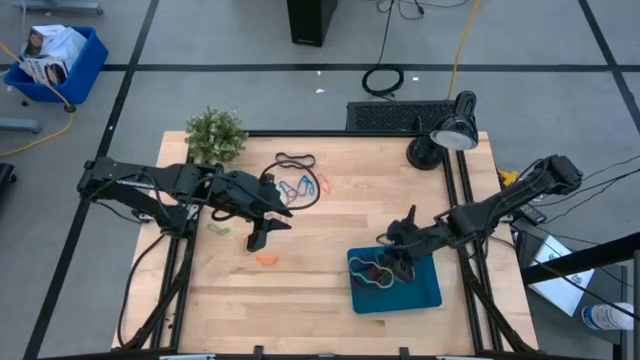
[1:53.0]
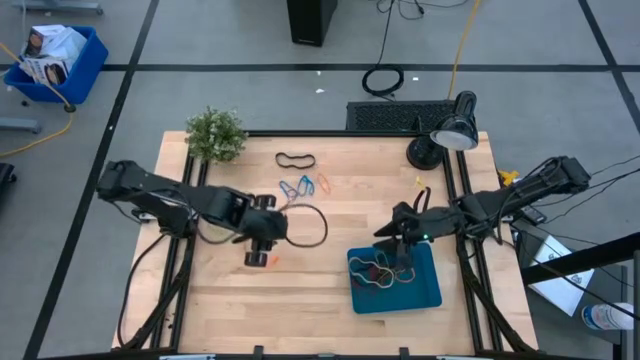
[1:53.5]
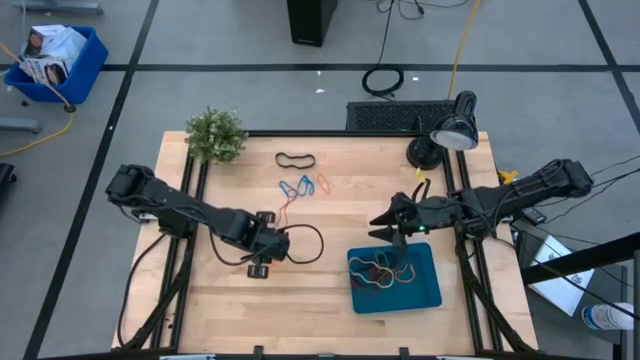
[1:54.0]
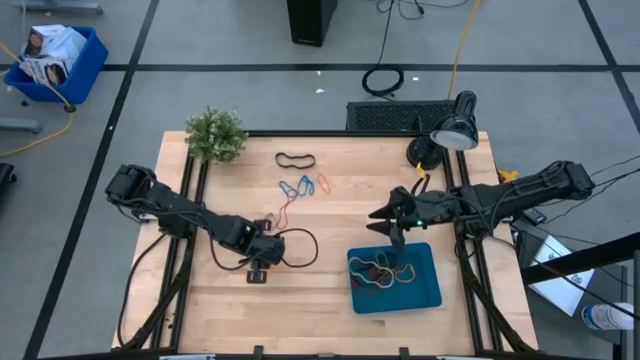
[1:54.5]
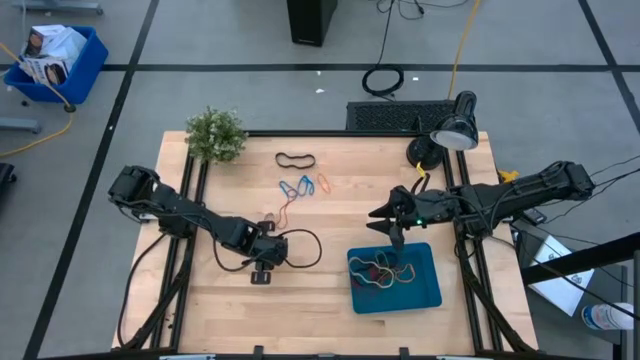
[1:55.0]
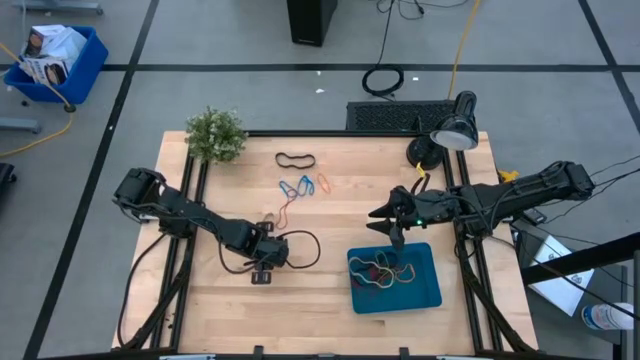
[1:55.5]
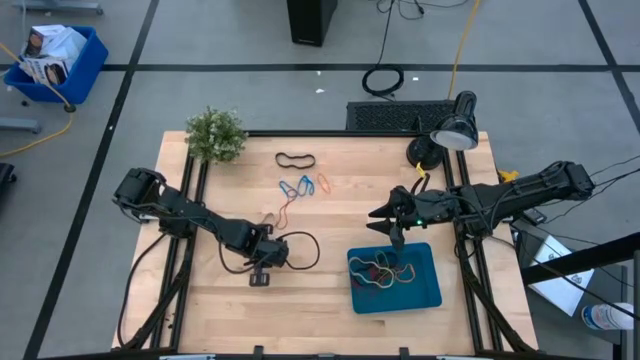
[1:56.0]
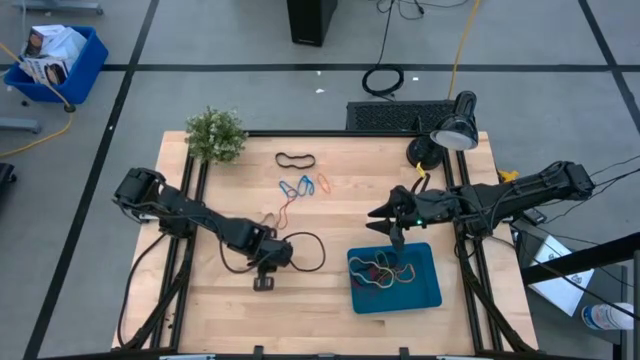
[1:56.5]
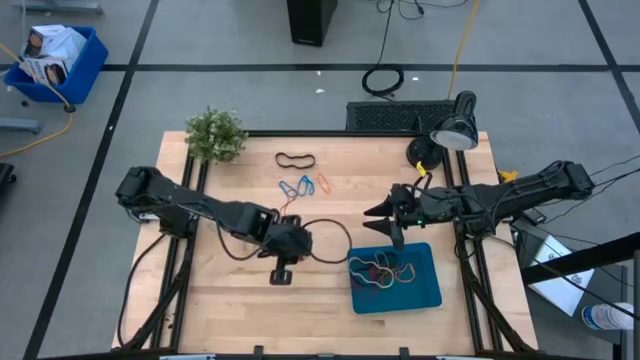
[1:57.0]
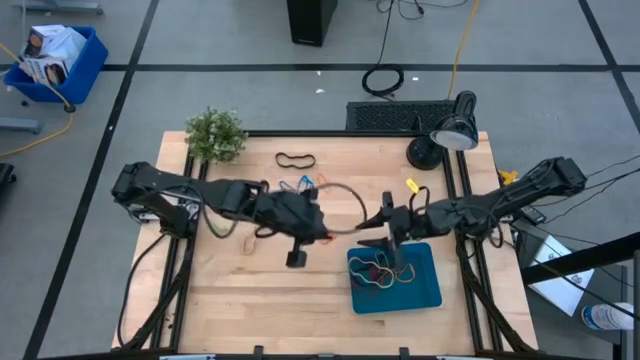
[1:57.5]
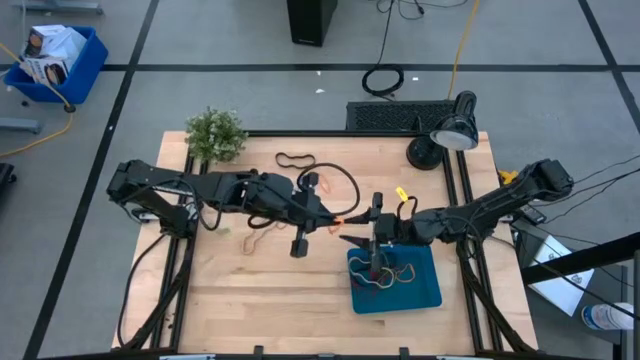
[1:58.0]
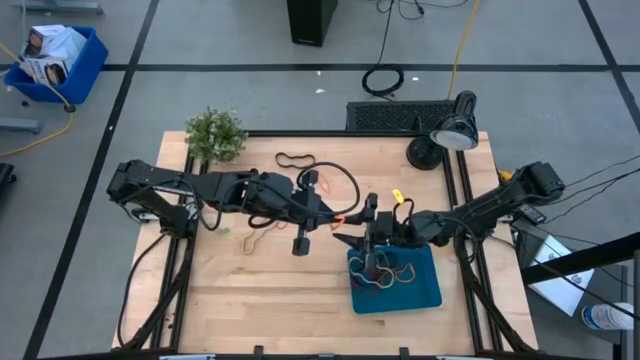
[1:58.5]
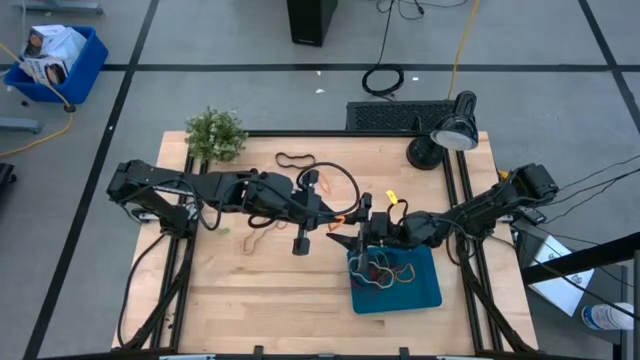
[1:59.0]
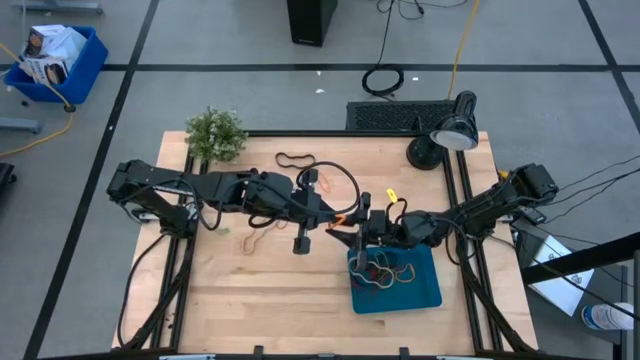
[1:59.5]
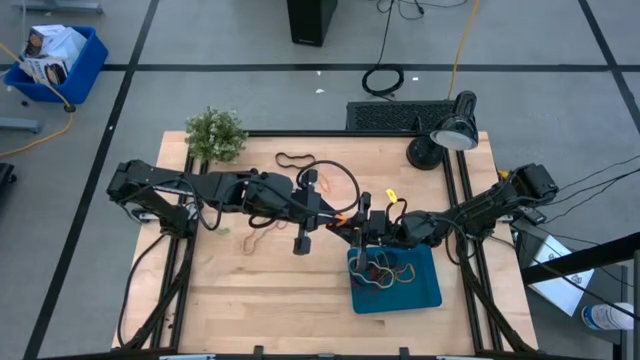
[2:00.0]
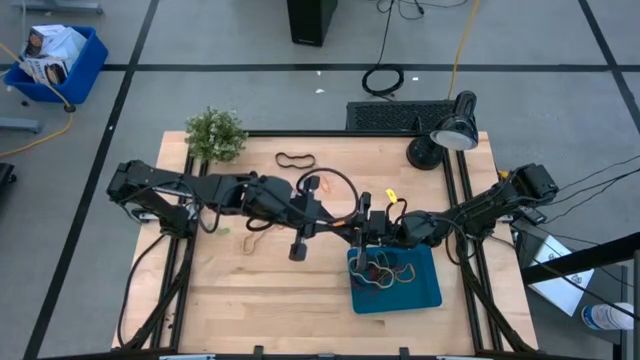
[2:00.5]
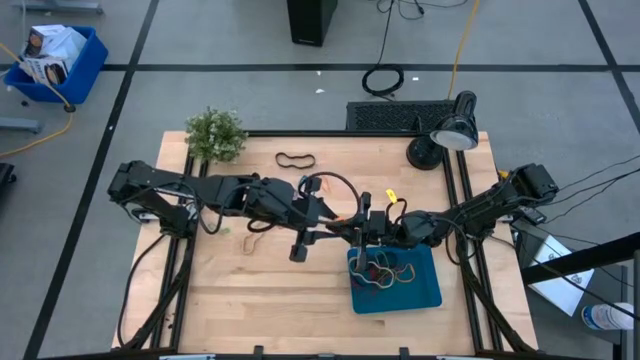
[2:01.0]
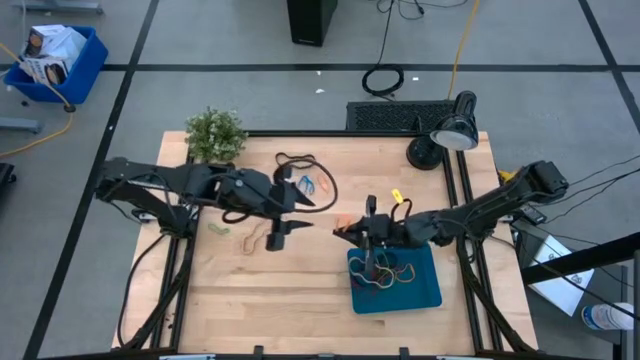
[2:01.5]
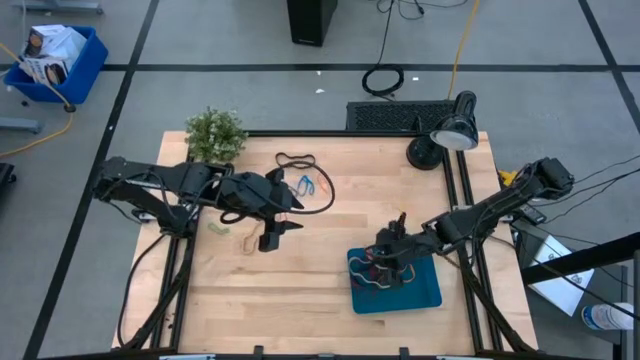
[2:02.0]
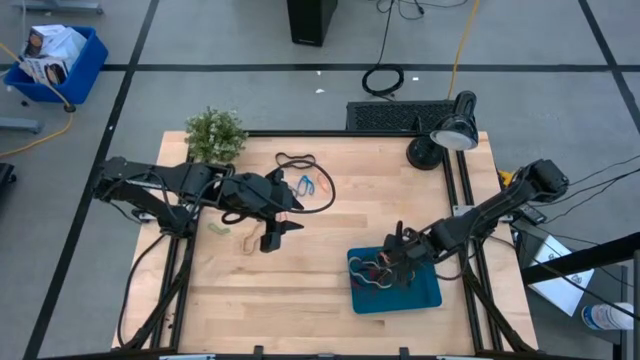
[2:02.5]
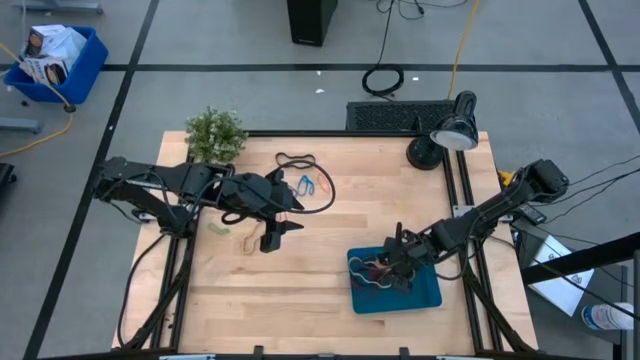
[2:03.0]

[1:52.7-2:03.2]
Task: Pick and place rubber bands into bin
Put the orange rubber band into the blue bin

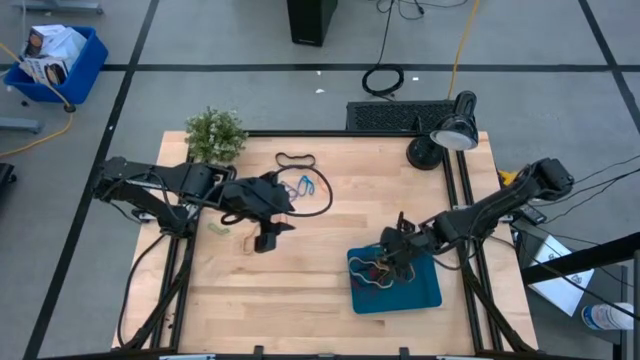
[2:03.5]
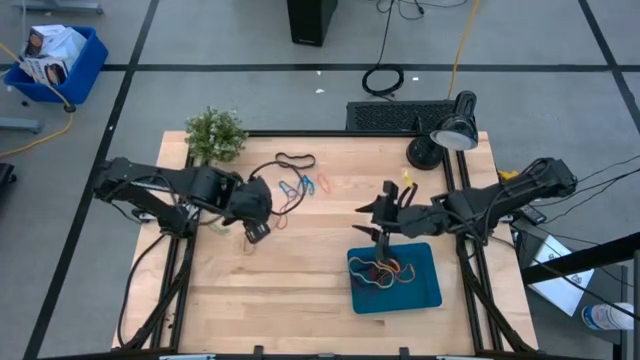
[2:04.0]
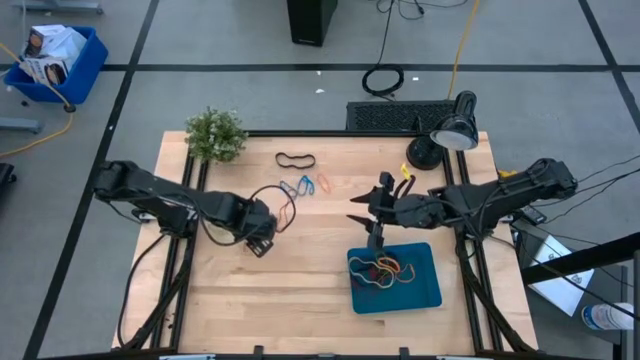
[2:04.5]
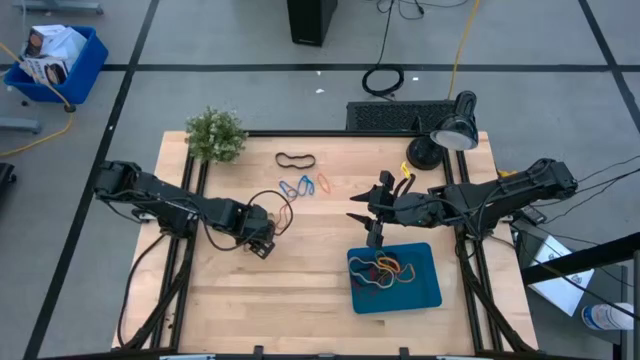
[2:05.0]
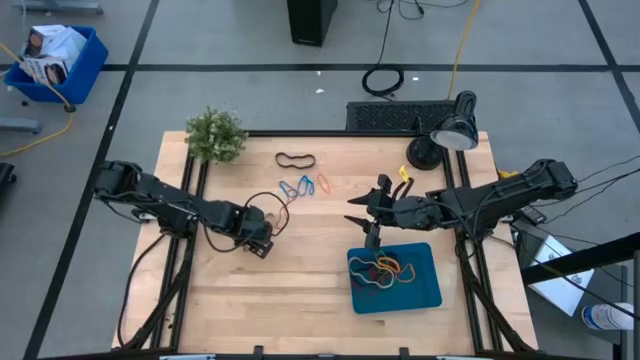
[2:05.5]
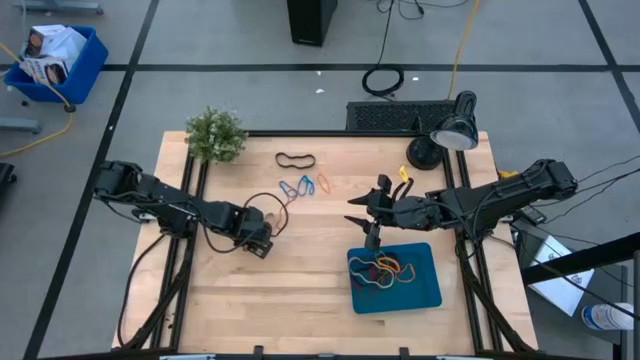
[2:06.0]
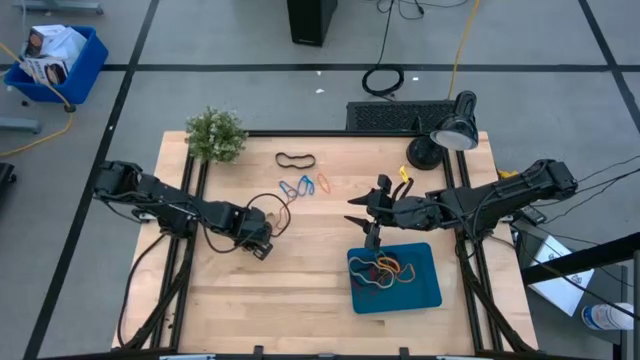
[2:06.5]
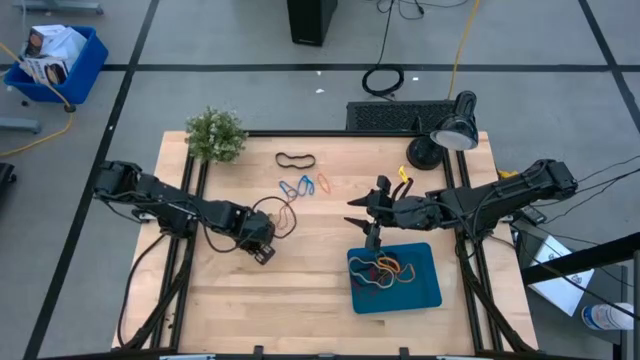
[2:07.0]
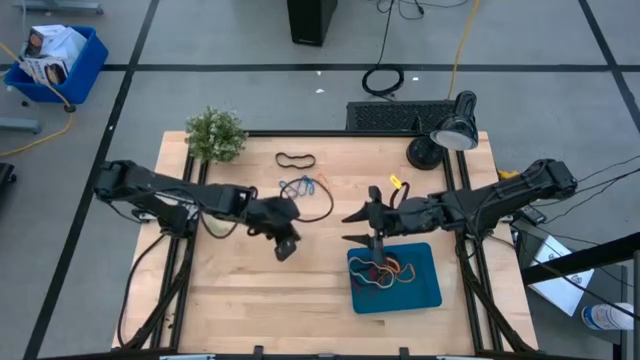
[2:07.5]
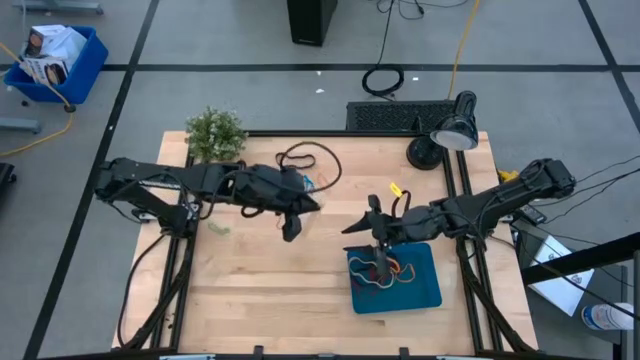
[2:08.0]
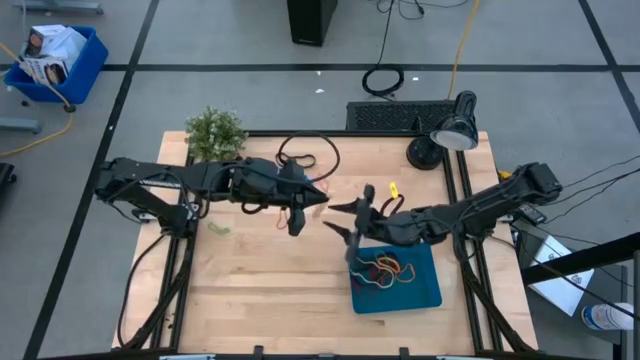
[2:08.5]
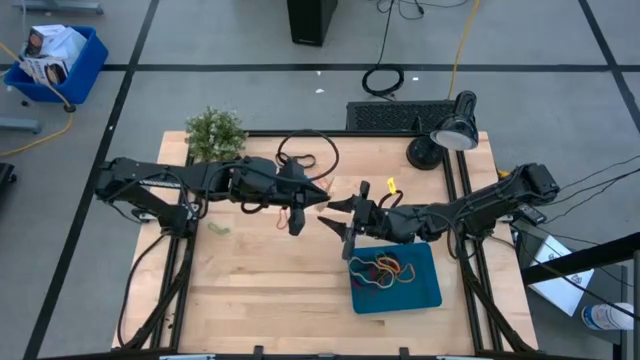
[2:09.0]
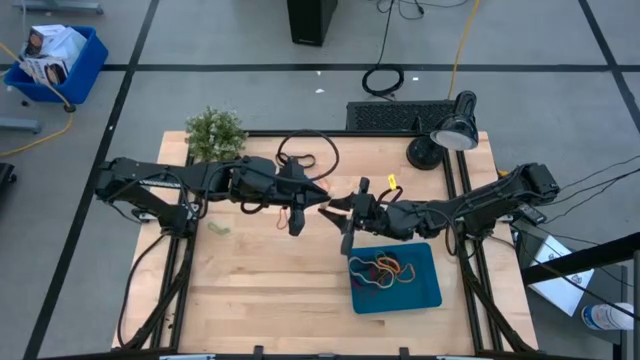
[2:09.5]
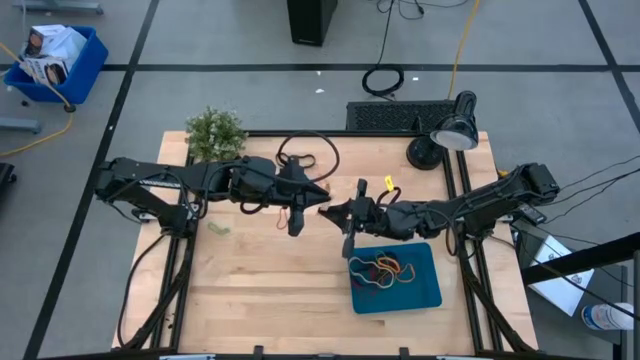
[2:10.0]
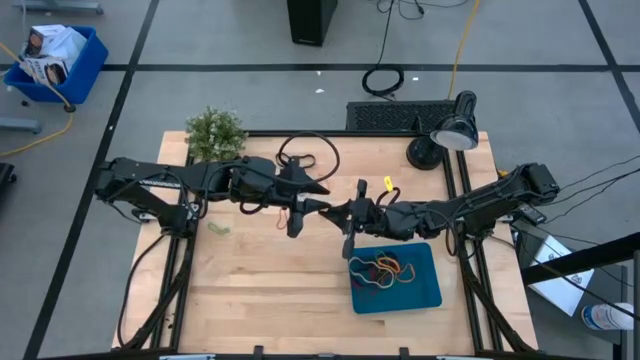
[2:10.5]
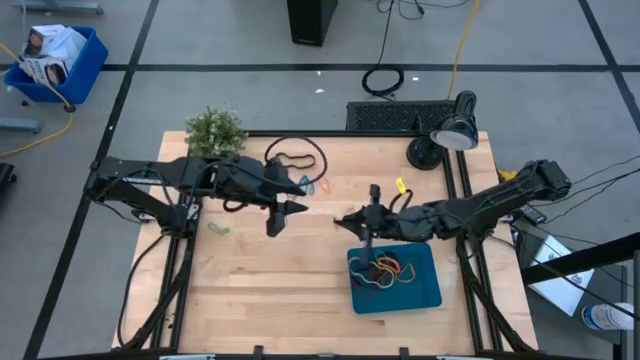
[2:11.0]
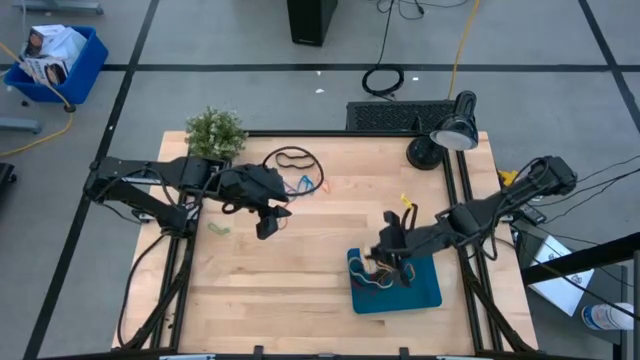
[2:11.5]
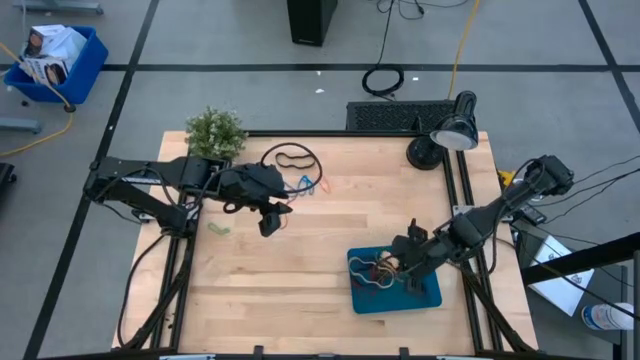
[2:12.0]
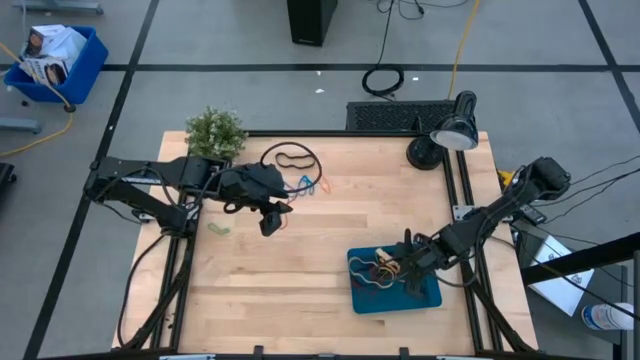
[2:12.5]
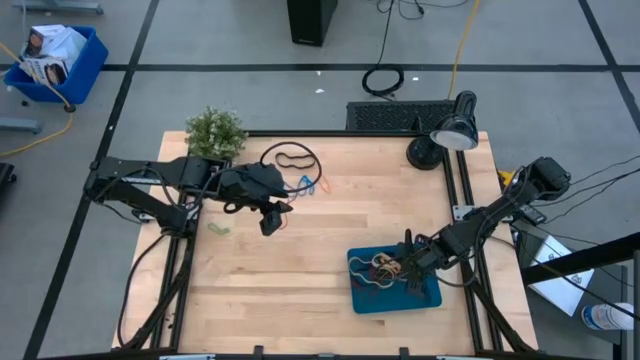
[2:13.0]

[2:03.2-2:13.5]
Put the light brown rubber bands into the blue bin
